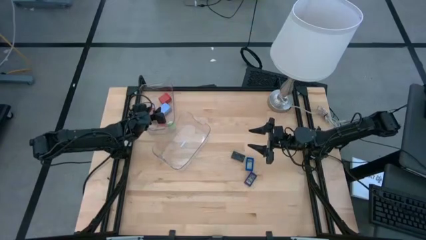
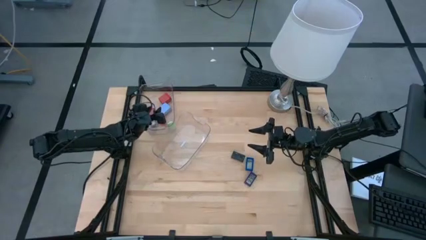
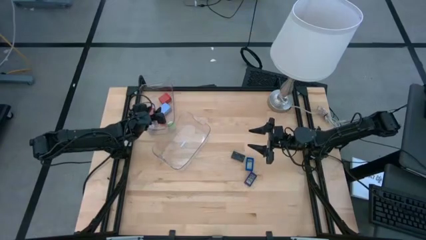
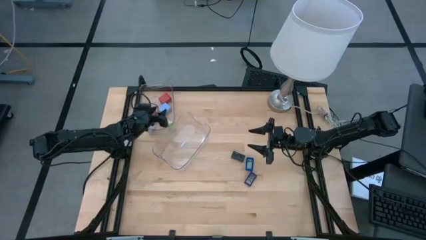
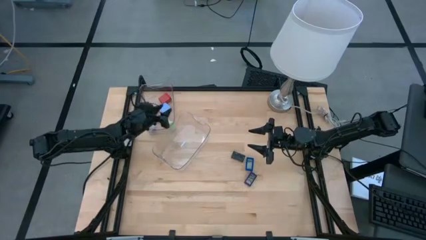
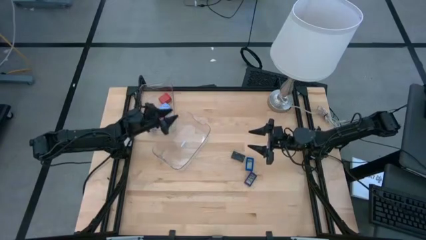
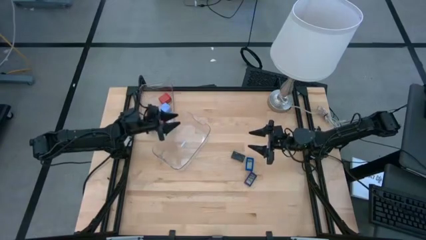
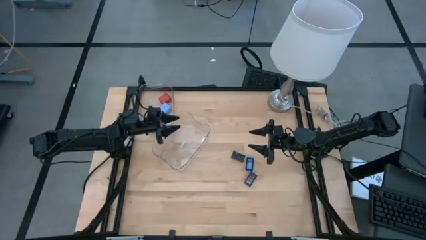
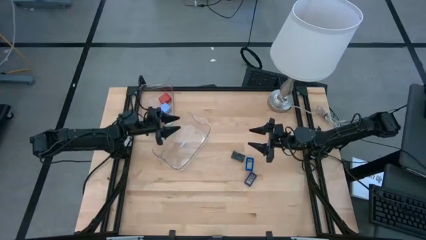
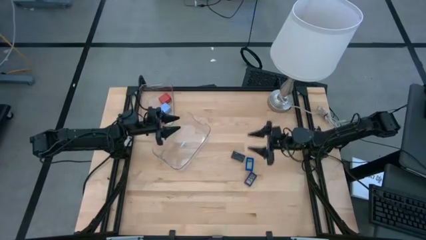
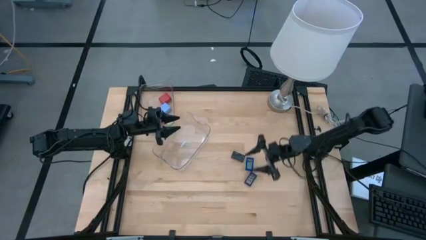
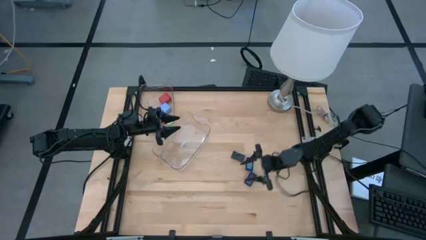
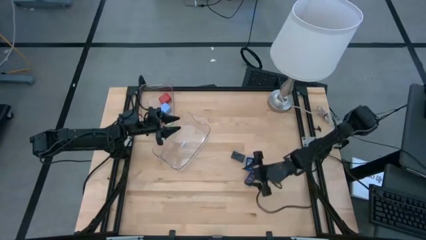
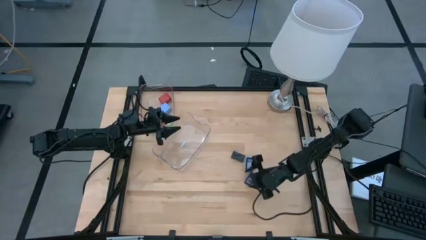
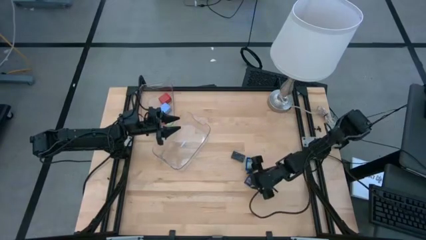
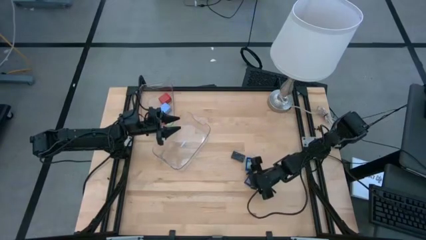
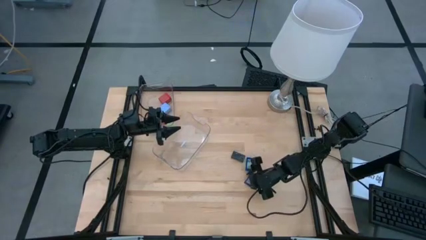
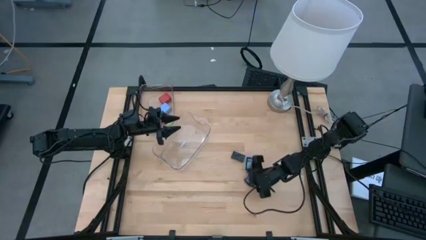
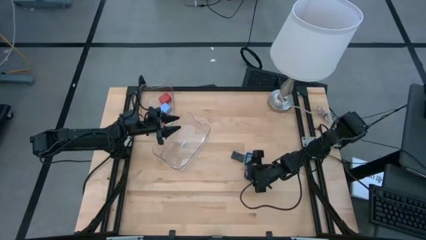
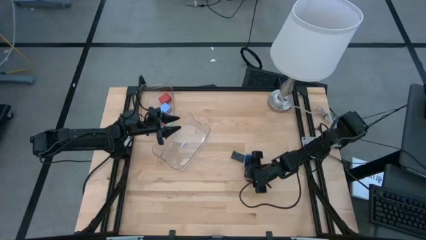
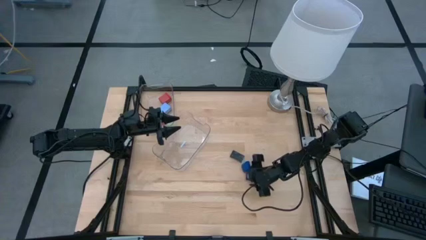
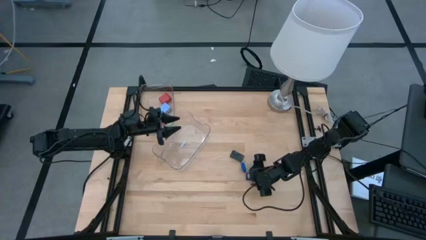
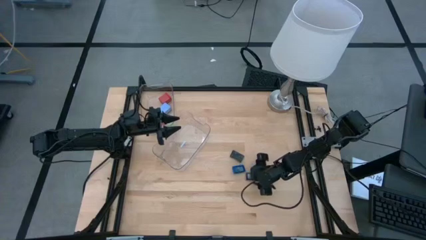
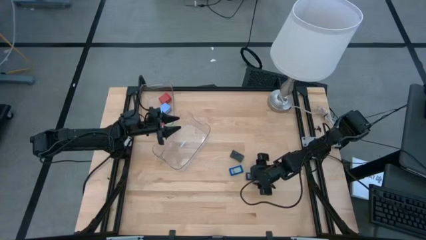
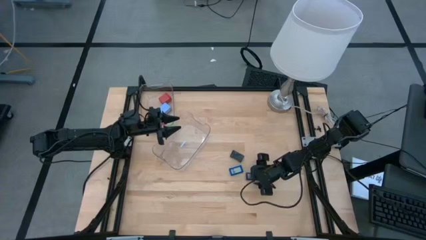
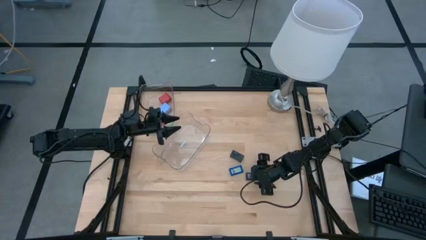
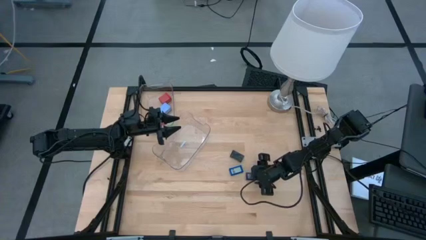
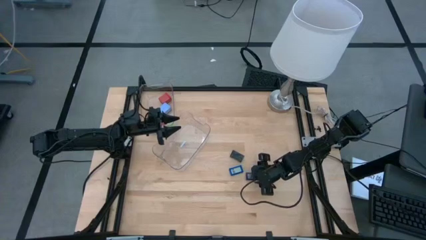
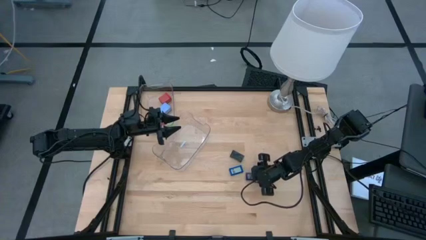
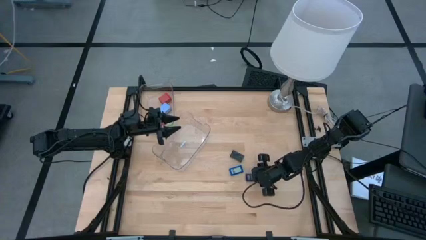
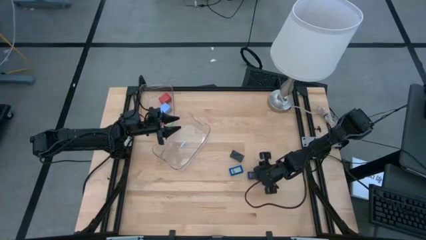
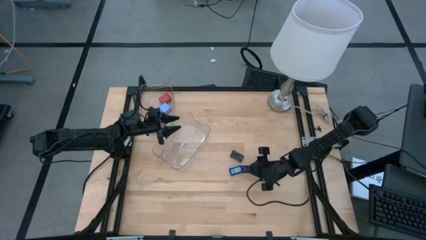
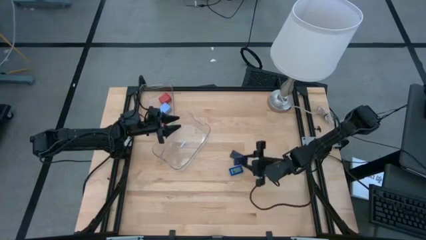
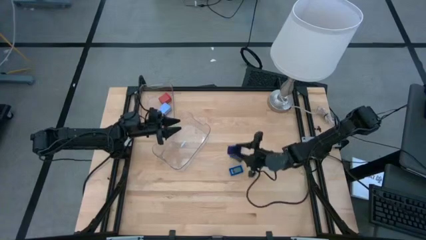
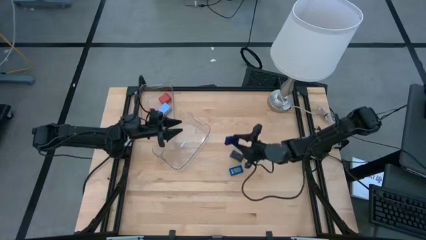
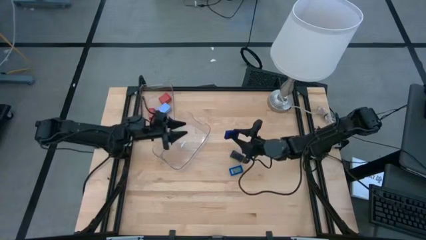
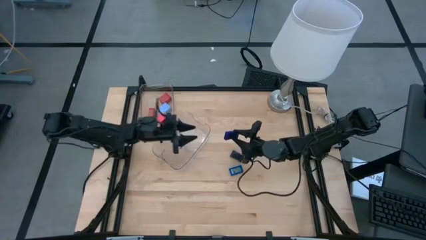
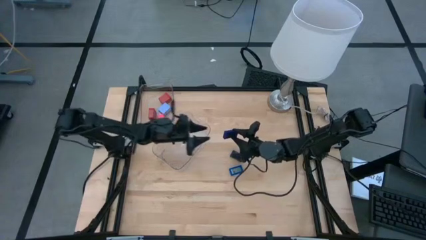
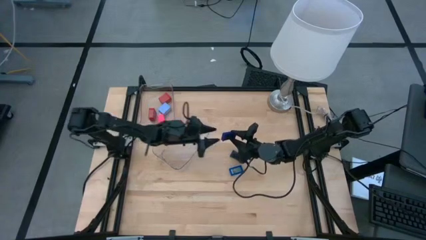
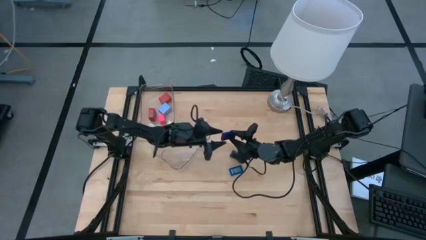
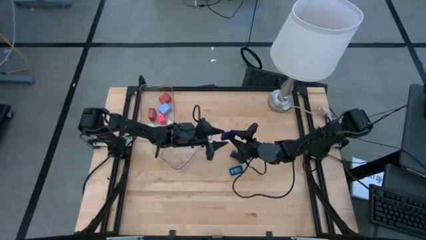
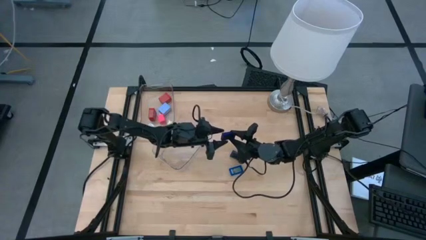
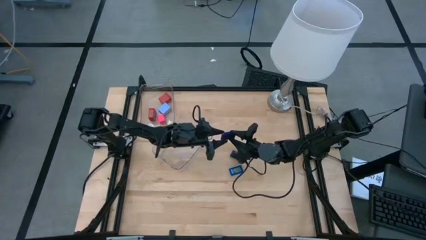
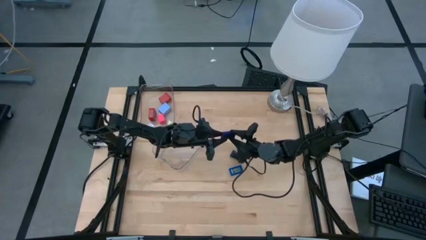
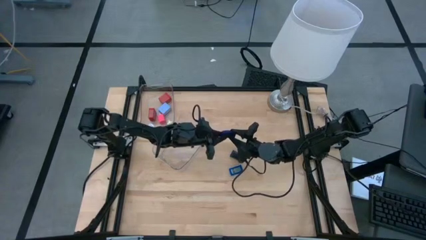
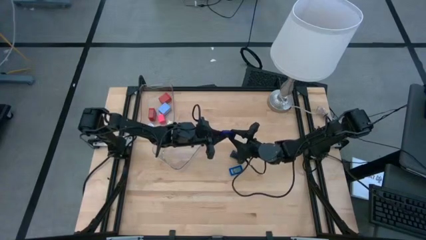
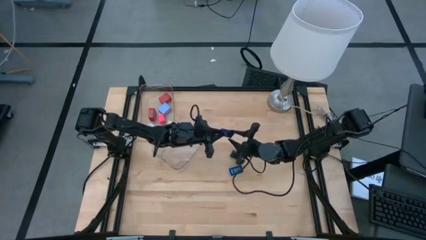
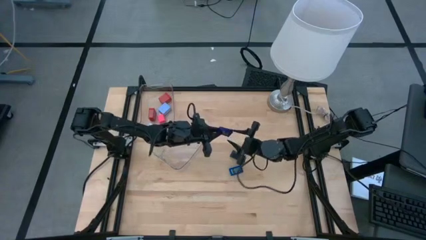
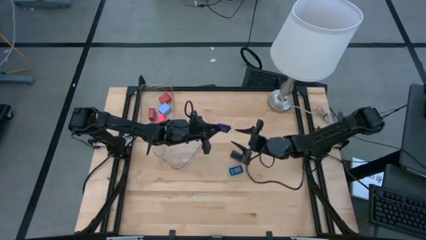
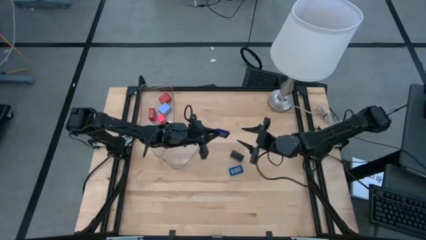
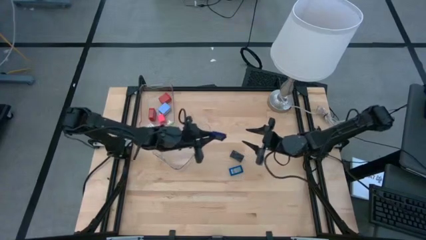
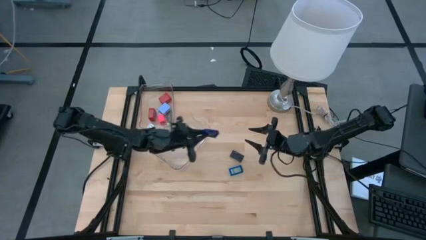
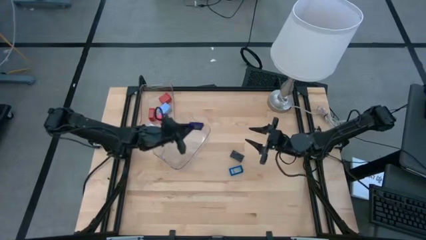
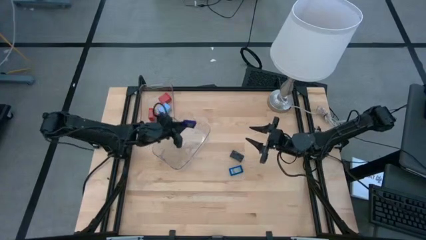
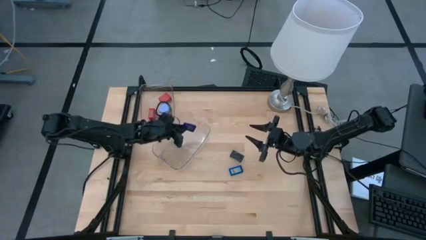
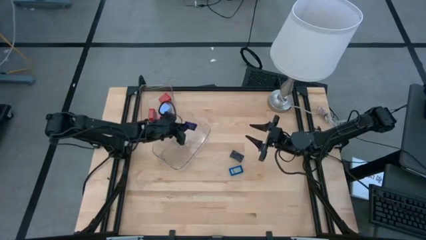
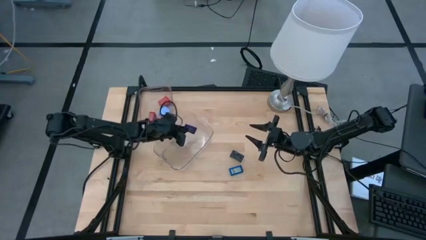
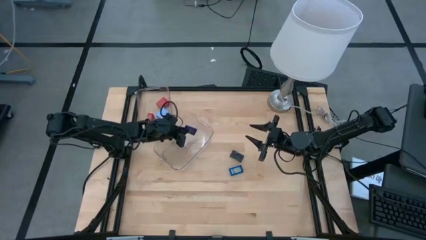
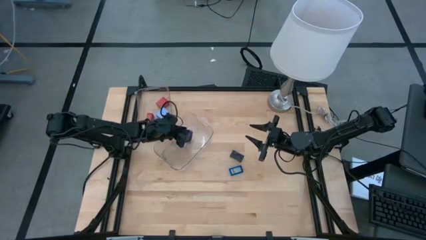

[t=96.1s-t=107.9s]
Task: Pick & Place Office items
Put the dark blue digital clock into the bottom transparent bin

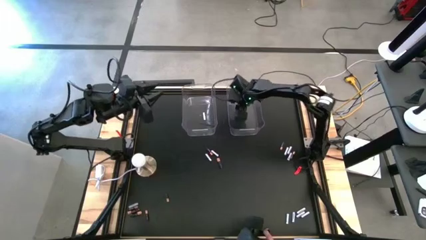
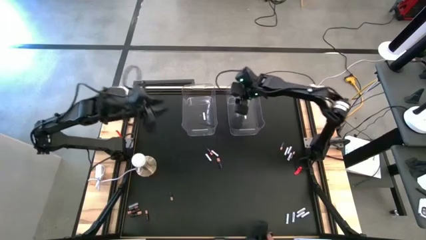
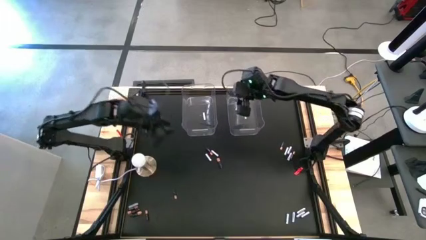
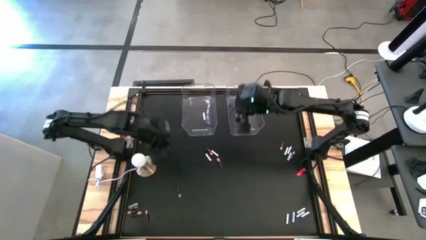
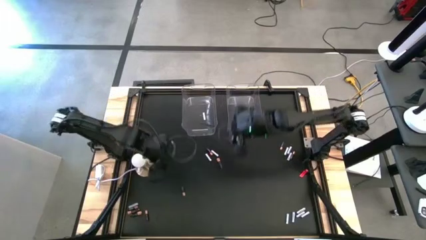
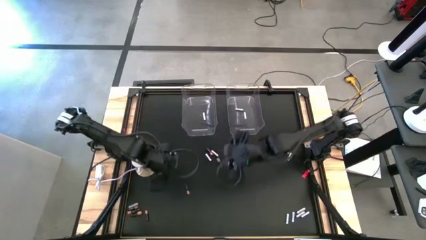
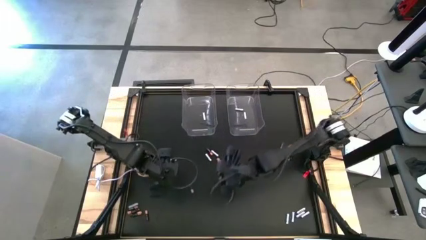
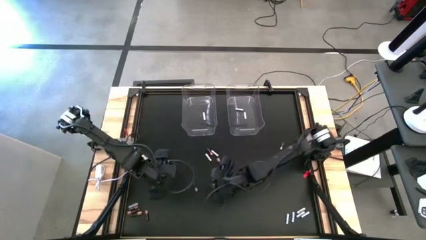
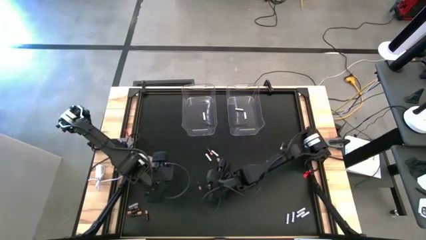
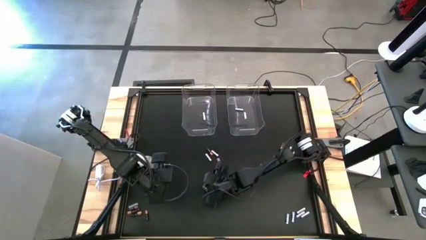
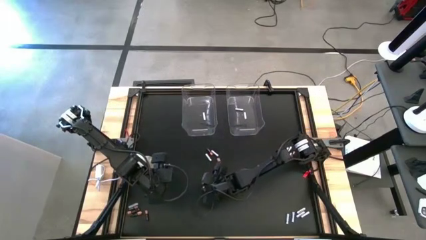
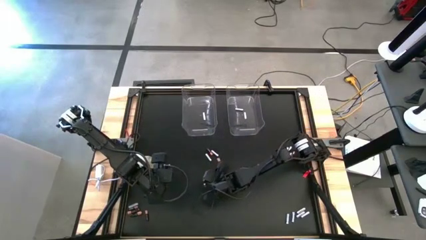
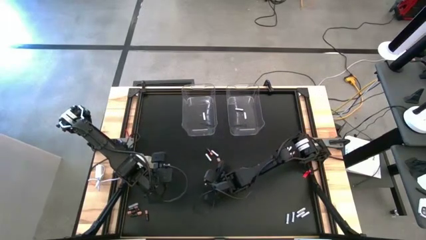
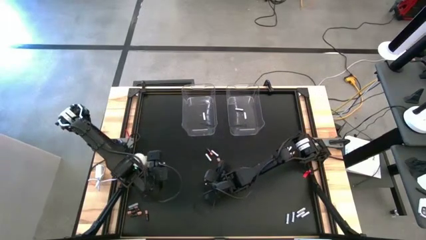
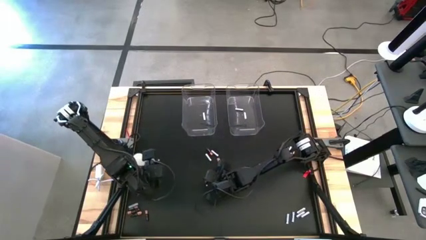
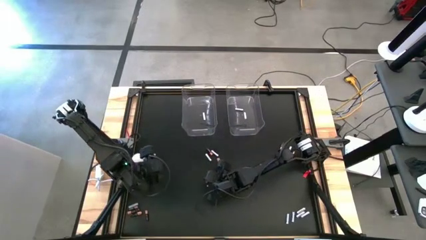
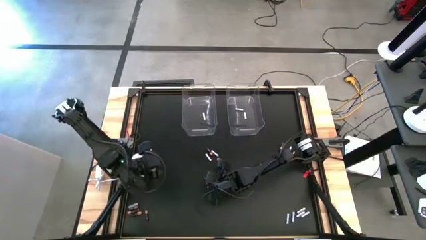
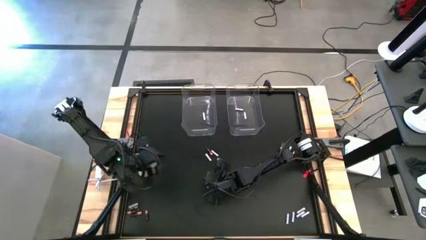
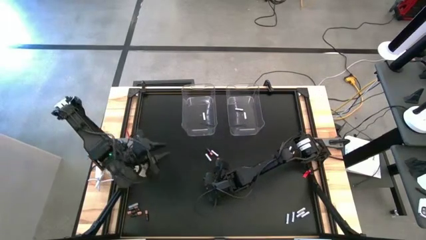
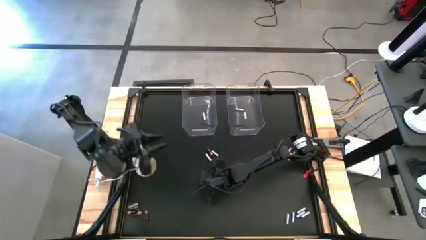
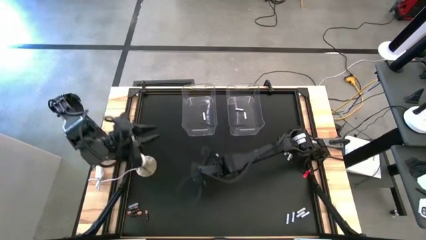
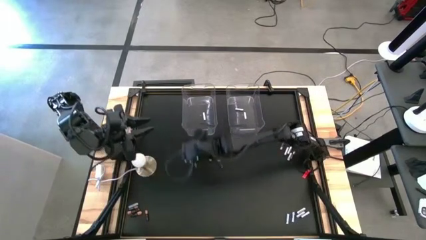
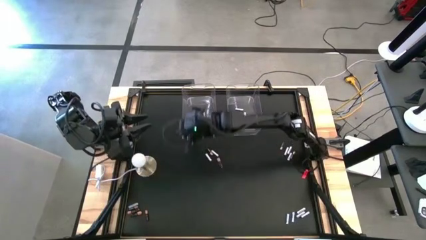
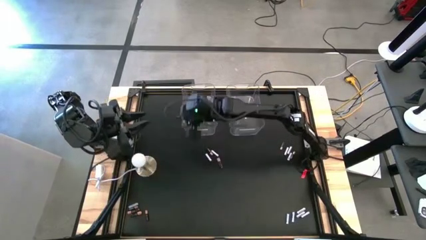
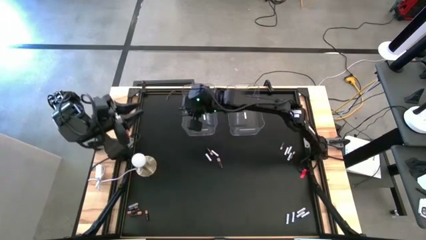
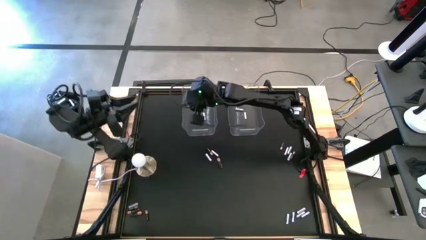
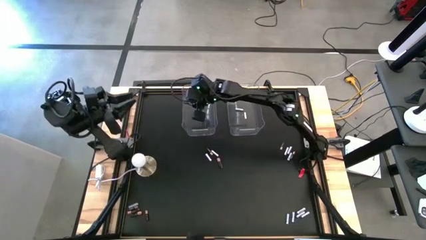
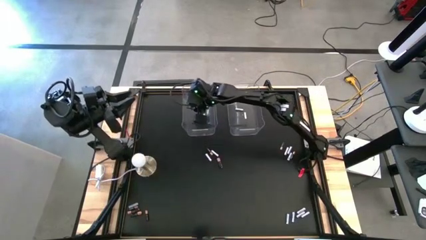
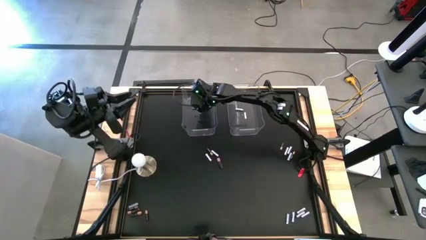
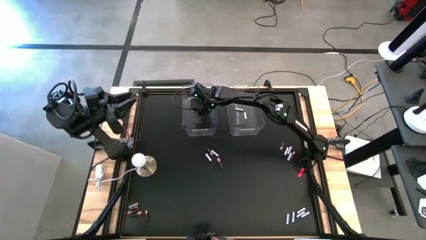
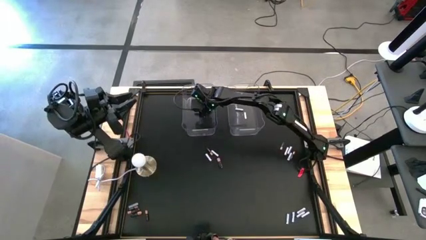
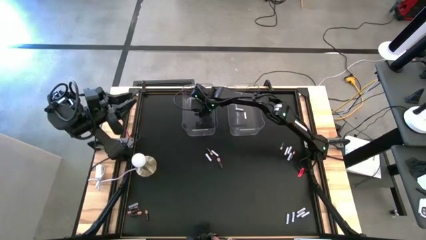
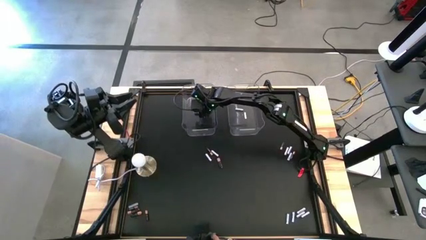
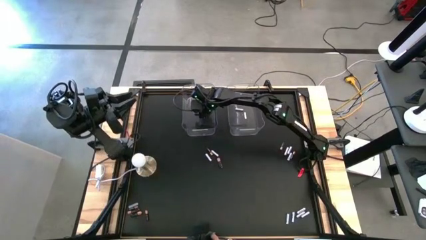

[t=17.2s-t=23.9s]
Task: Sort batteries
Put the black battery into the left transparent bin
